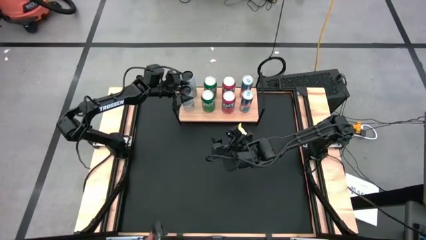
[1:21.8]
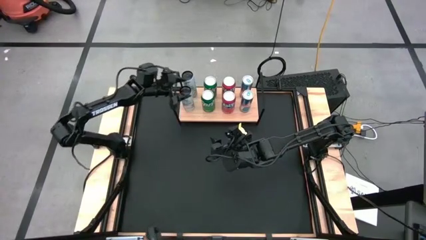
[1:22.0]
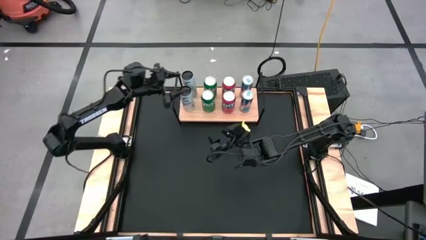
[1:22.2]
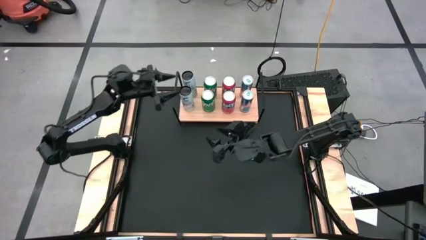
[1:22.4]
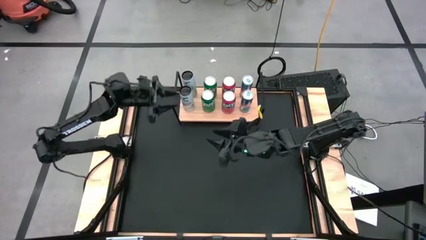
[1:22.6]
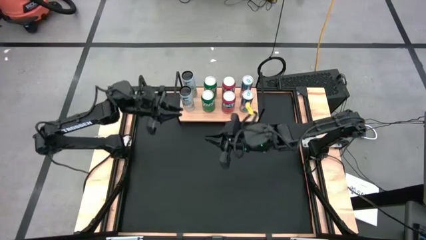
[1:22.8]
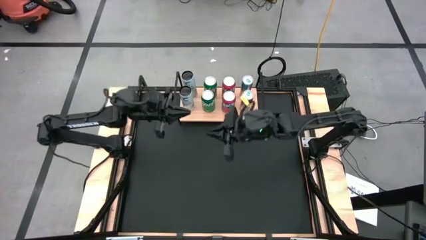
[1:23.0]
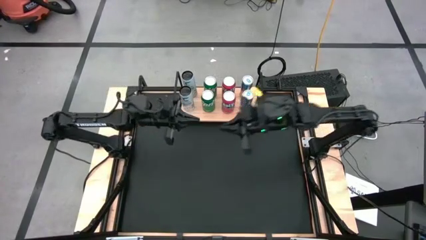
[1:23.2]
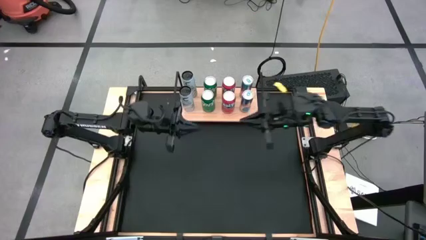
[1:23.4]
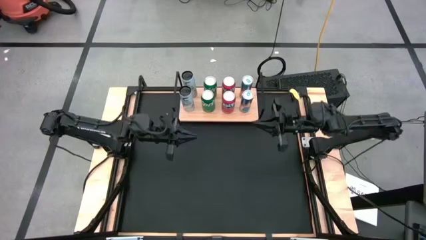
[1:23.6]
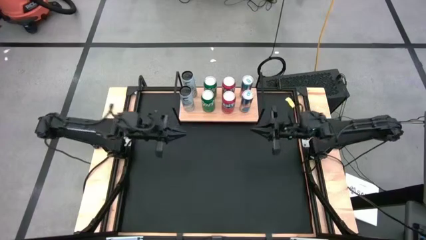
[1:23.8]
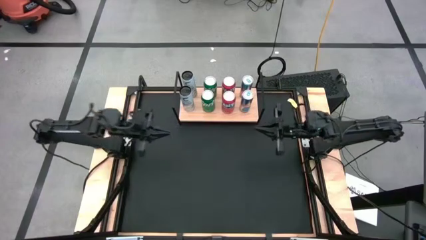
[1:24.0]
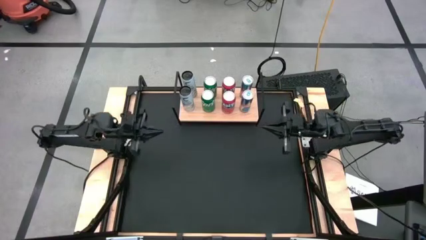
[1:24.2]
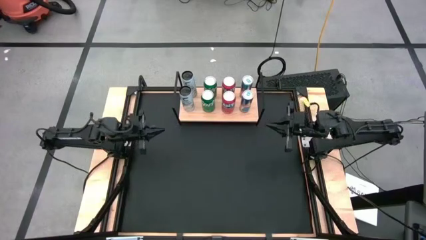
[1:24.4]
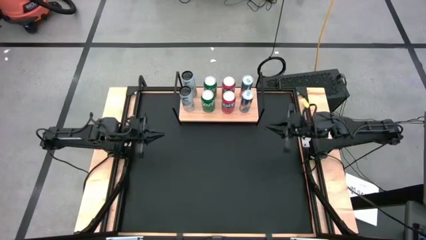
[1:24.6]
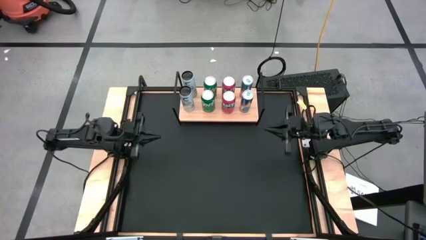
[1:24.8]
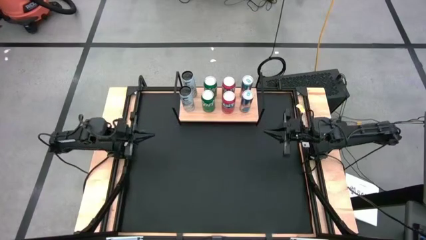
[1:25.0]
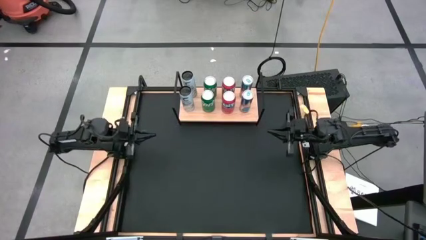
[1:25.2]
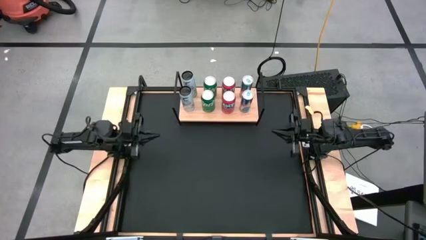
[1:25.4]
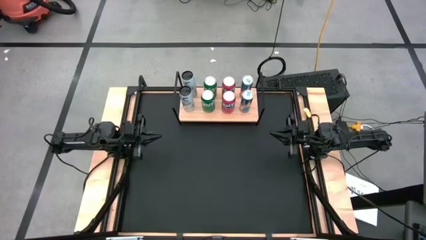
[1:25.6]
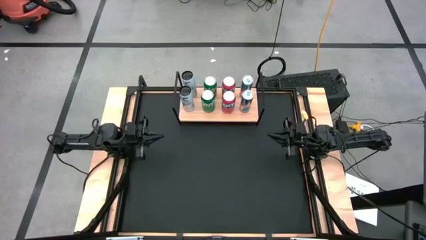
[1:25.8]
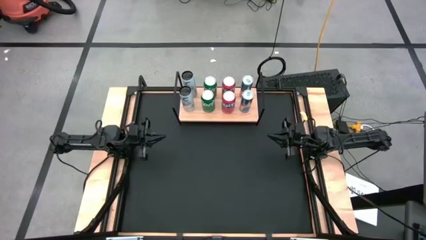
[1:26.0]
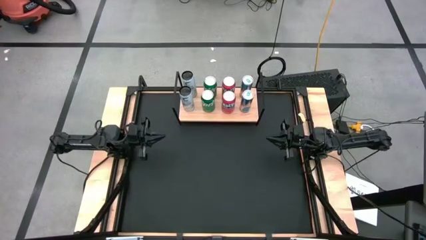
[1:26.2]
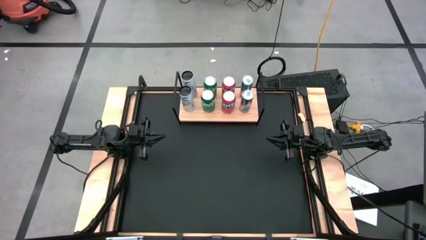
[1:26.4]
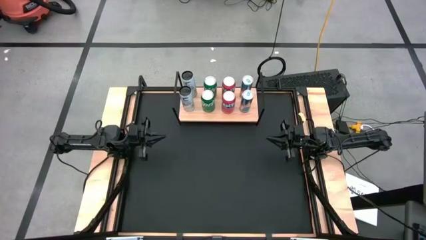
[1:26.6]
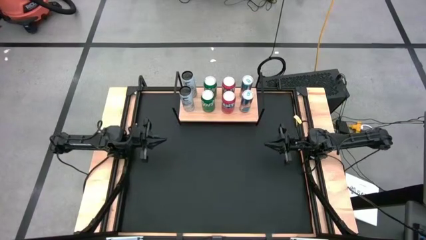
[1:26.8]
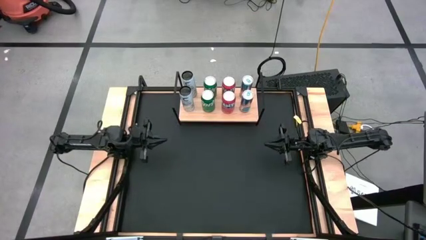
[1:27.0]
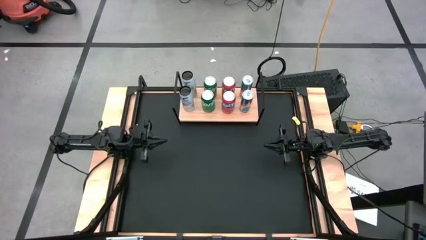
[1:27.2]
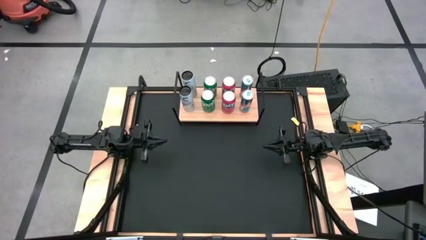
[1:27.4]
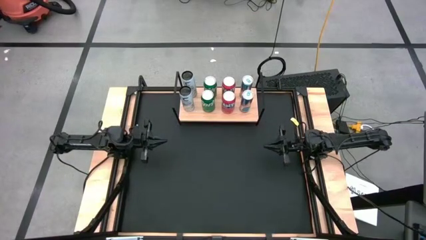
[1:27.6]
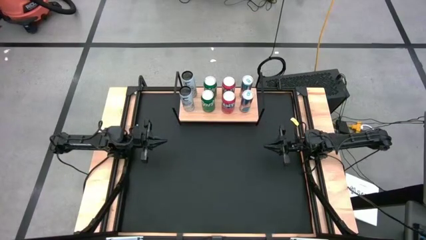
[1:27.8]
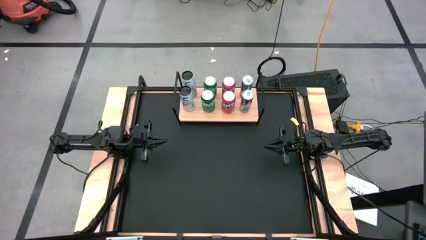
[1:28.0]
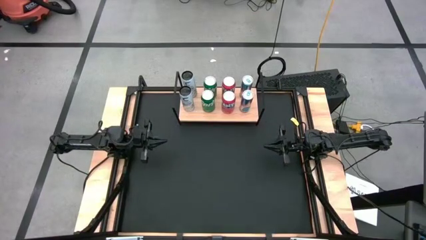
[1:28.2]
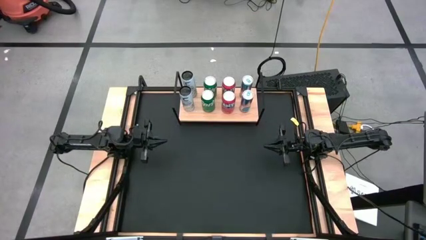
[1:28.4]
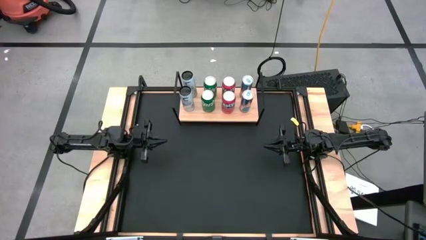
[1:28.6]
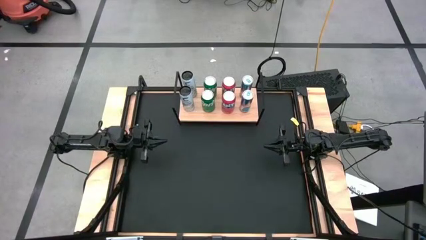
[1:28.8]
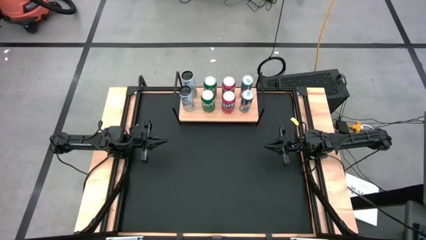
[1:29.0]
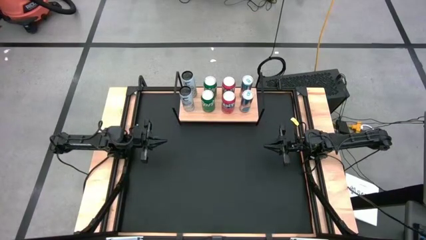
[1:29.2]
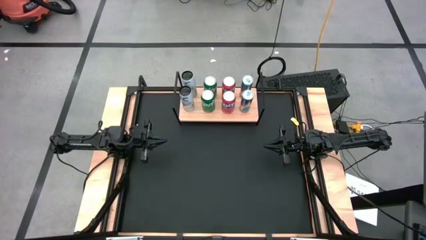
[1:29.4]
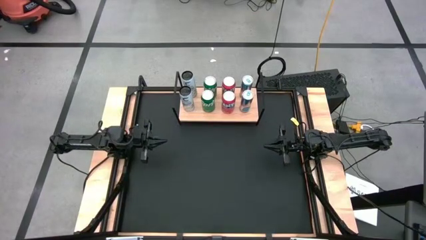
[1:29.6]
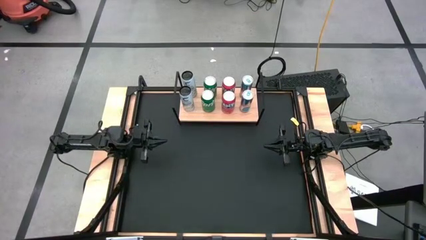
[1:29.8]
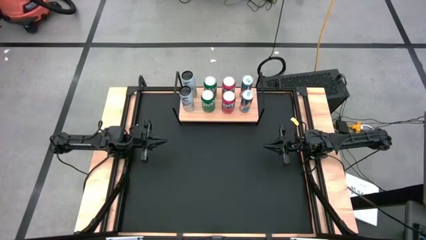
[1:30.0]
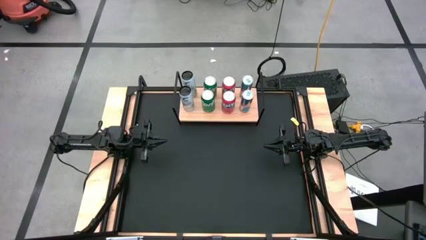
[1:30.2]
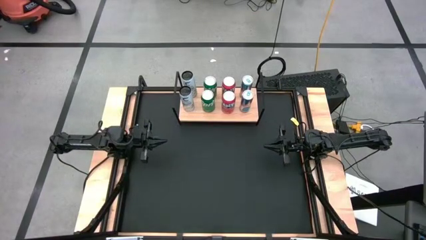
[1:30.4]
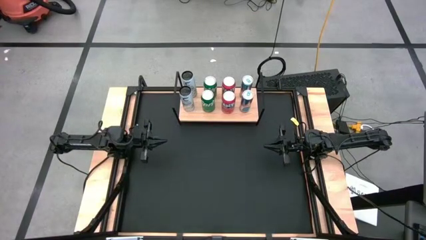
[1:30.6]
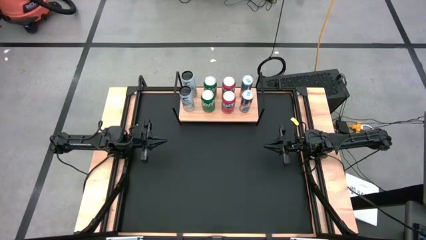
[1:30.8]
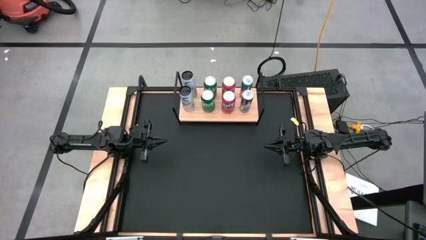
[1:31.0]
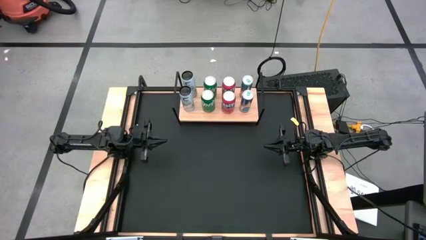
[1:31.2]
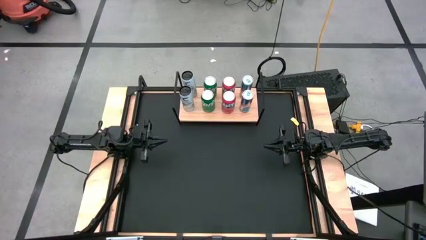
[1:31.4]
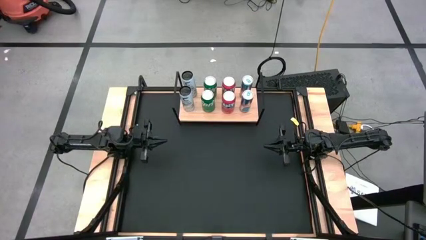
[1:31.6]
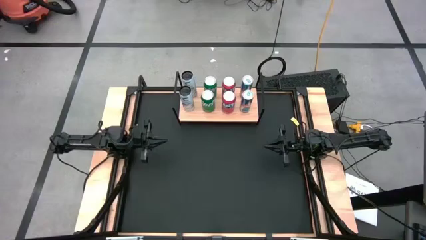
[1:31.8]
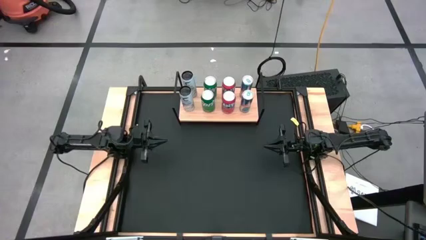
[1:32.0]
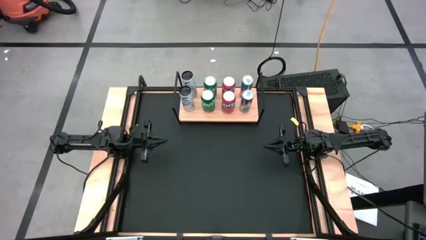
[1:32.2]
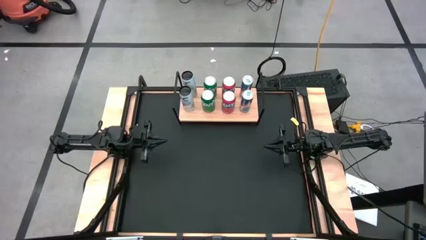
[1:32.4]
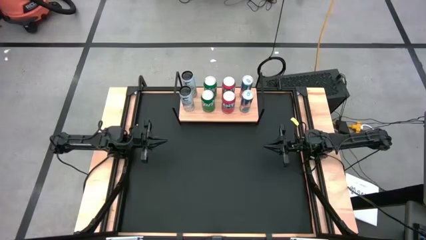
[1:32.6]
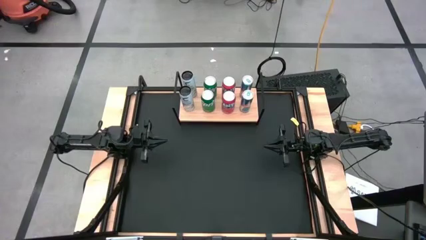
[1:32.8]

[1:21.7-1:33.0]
Task: Place canned beverage on shelf
Return to Home Position
